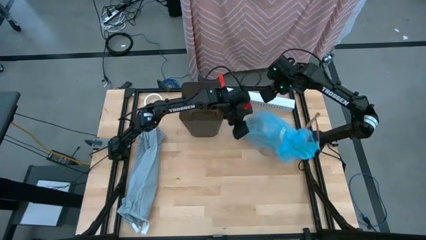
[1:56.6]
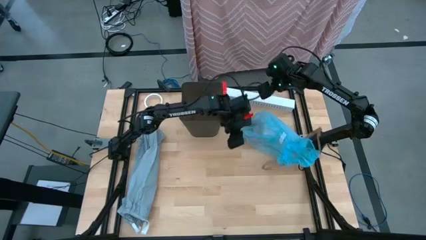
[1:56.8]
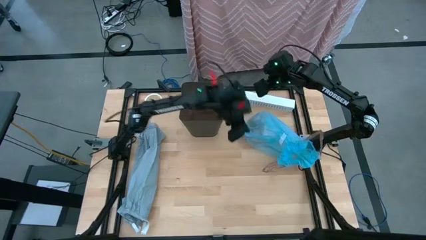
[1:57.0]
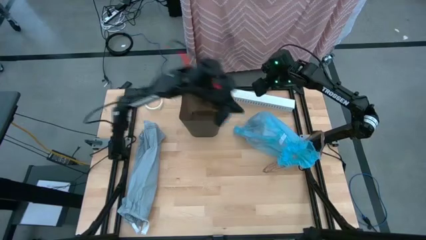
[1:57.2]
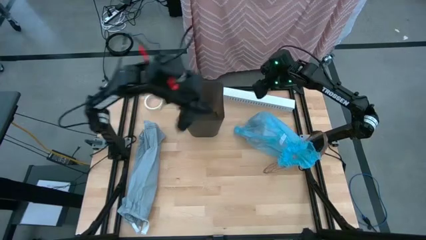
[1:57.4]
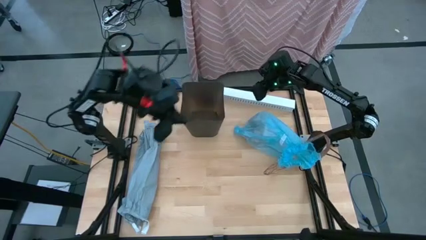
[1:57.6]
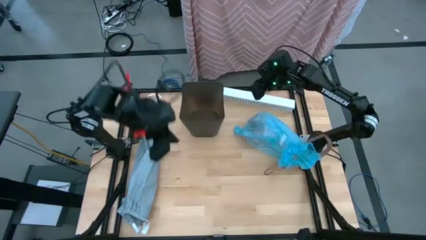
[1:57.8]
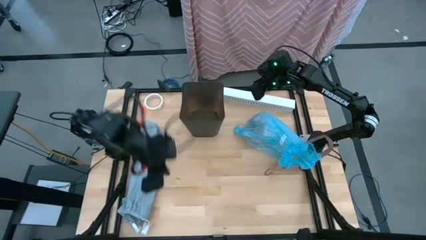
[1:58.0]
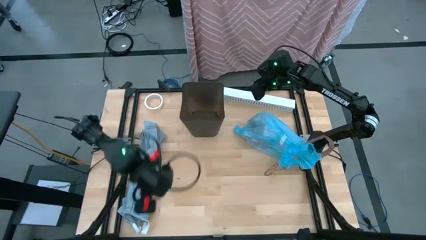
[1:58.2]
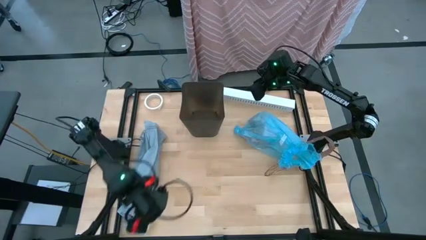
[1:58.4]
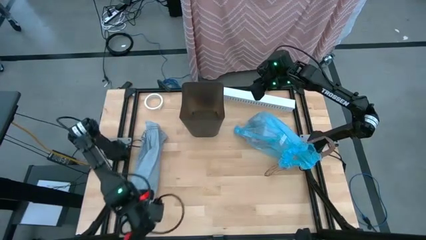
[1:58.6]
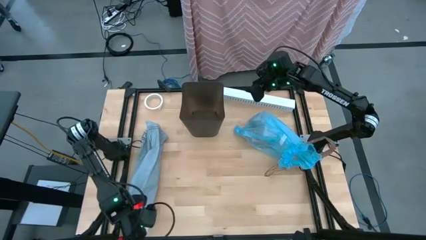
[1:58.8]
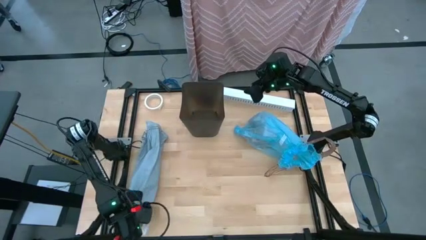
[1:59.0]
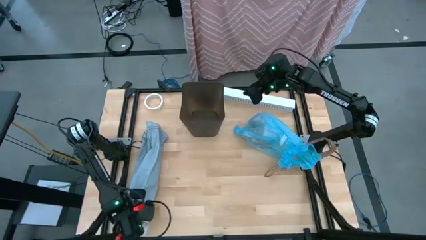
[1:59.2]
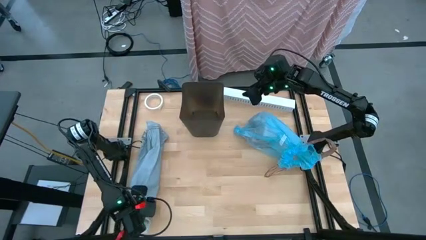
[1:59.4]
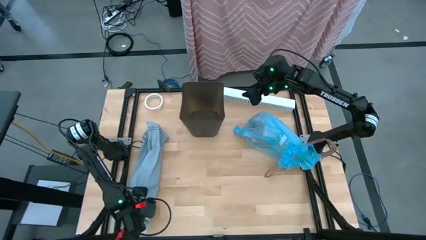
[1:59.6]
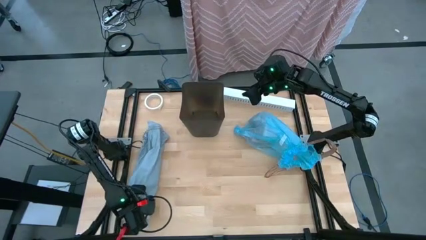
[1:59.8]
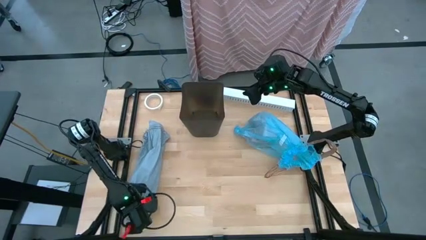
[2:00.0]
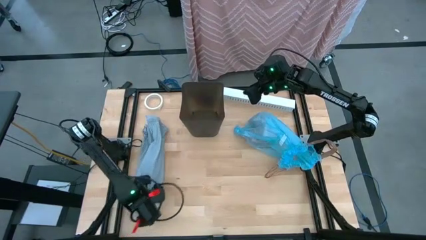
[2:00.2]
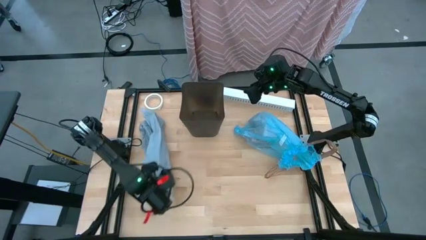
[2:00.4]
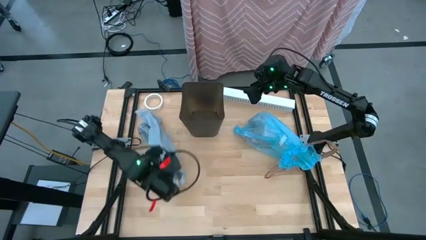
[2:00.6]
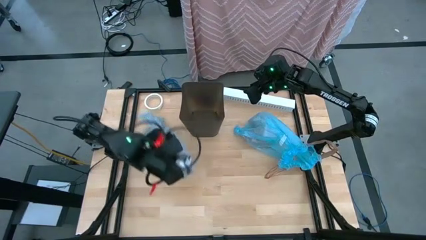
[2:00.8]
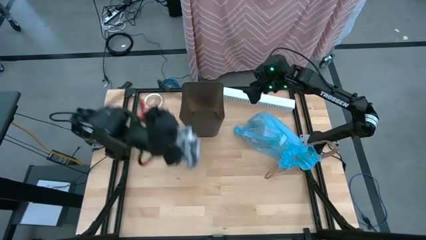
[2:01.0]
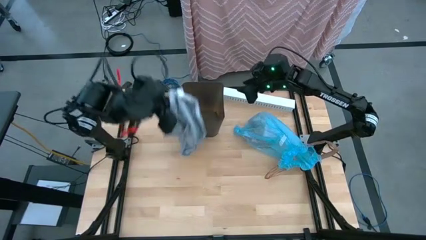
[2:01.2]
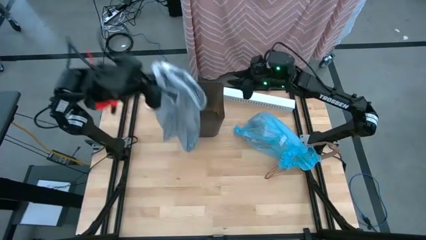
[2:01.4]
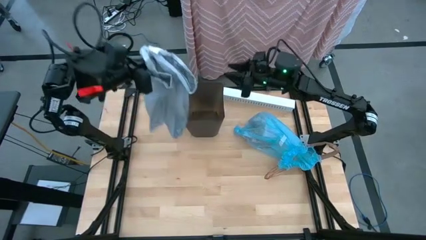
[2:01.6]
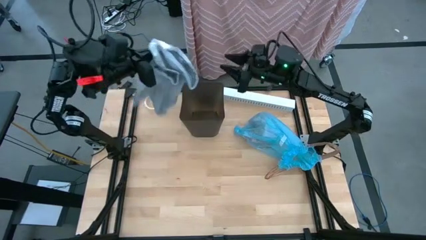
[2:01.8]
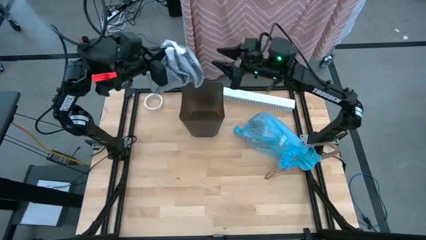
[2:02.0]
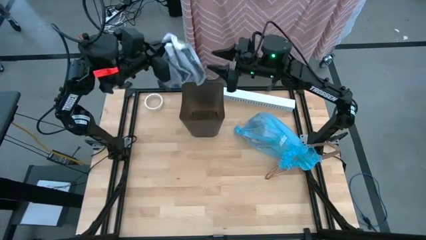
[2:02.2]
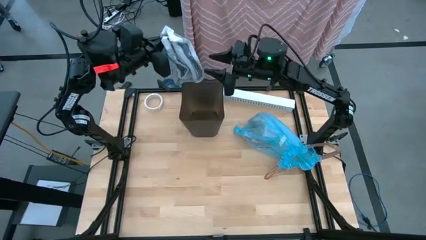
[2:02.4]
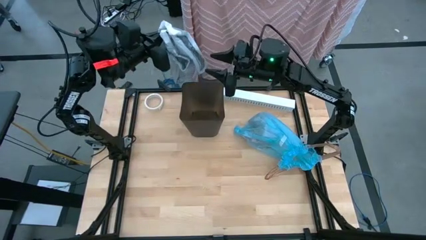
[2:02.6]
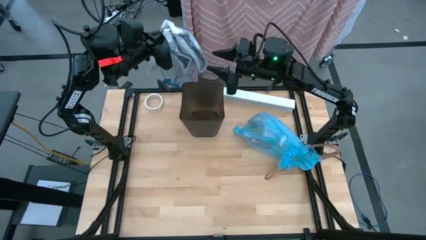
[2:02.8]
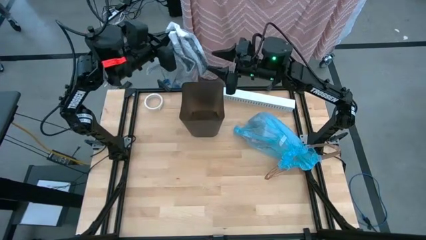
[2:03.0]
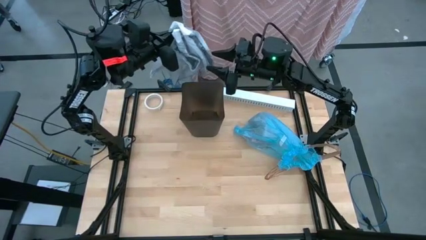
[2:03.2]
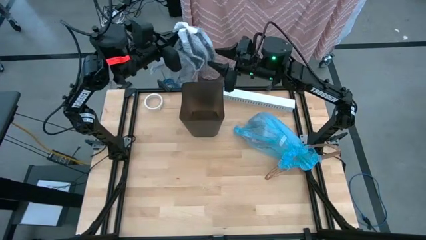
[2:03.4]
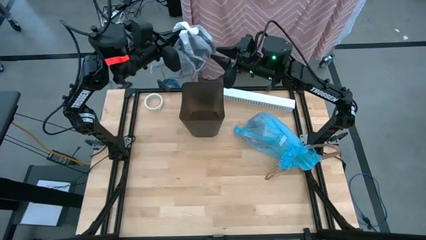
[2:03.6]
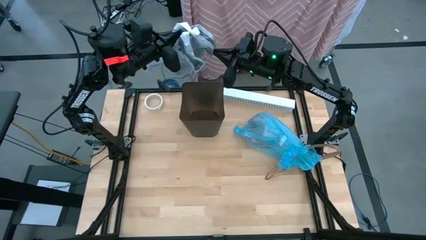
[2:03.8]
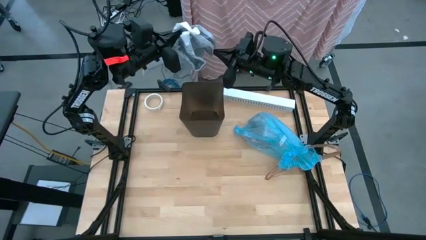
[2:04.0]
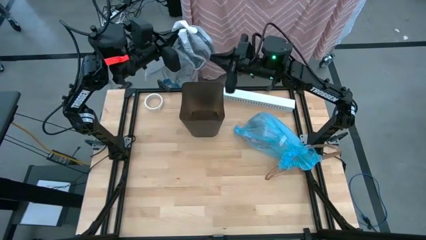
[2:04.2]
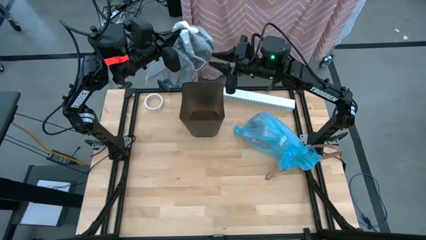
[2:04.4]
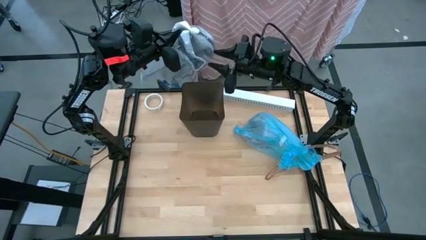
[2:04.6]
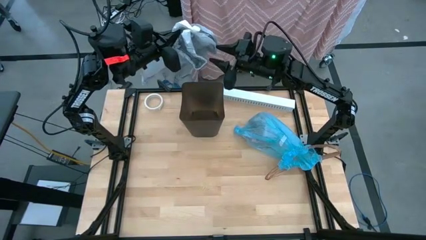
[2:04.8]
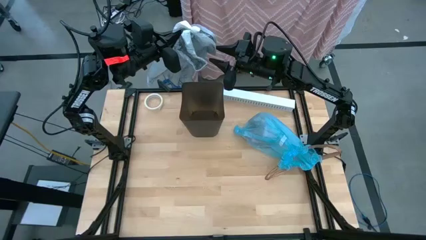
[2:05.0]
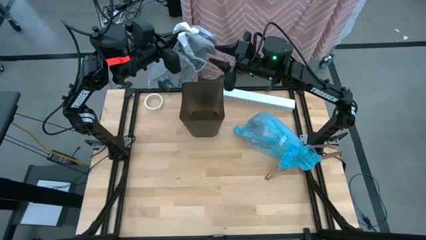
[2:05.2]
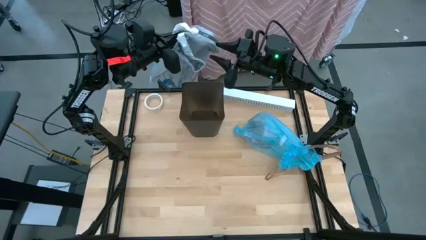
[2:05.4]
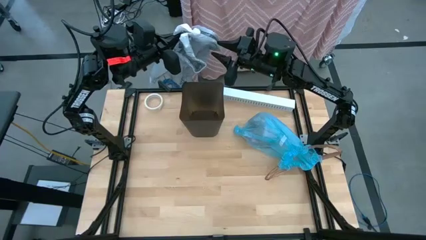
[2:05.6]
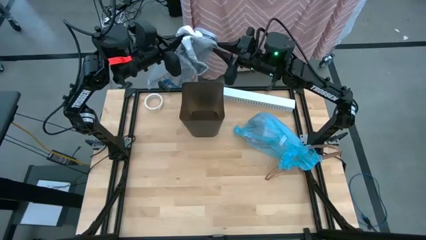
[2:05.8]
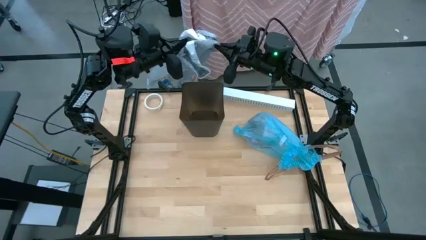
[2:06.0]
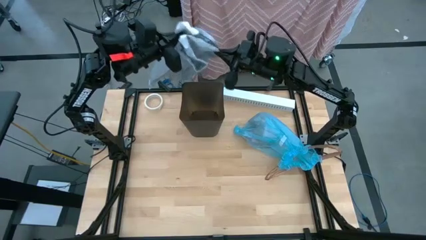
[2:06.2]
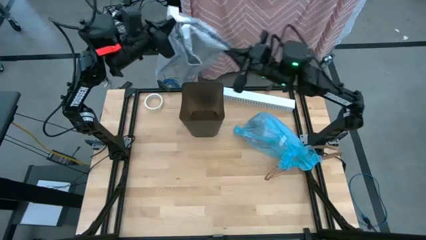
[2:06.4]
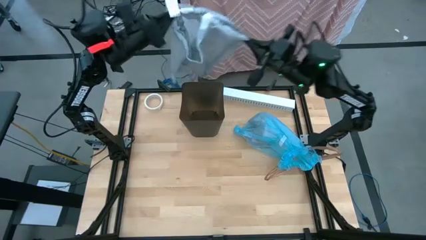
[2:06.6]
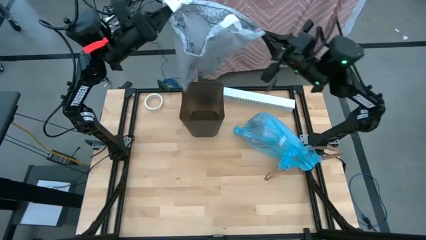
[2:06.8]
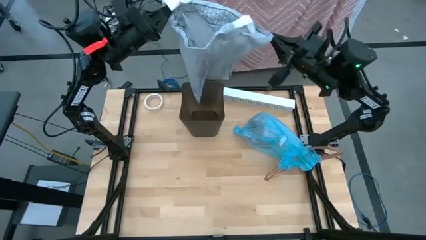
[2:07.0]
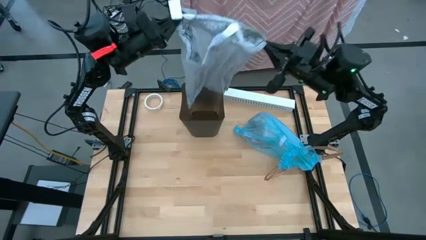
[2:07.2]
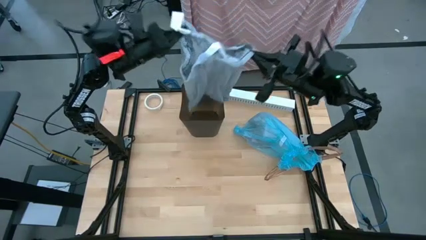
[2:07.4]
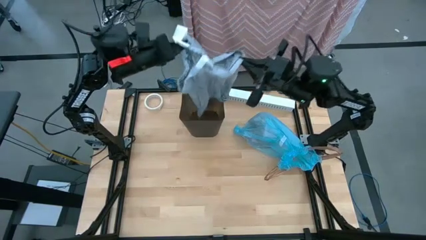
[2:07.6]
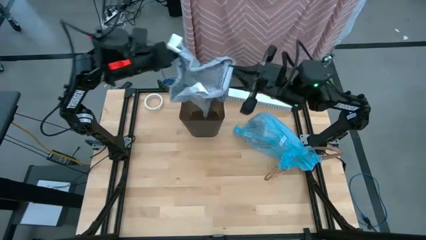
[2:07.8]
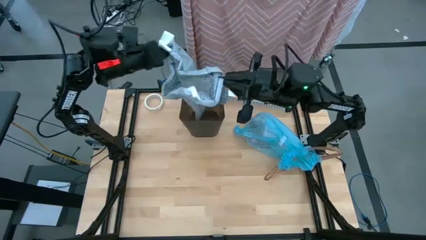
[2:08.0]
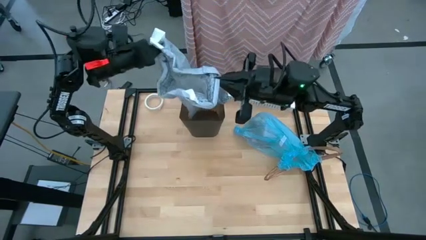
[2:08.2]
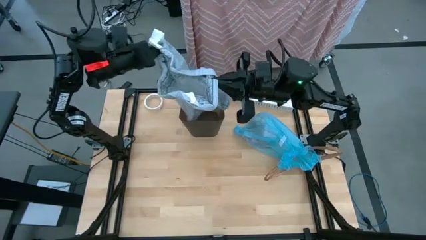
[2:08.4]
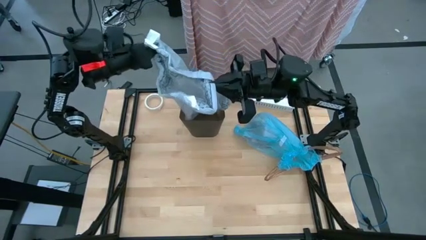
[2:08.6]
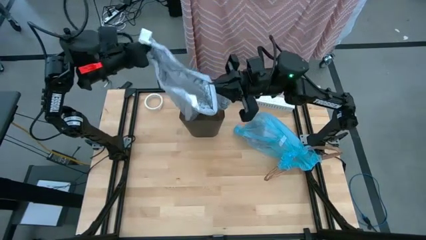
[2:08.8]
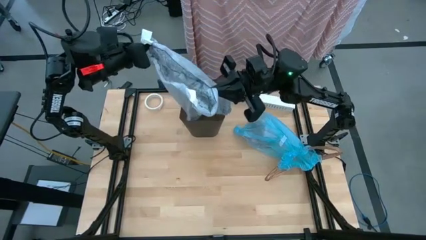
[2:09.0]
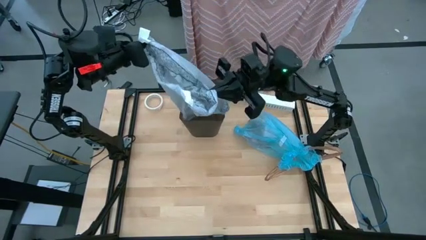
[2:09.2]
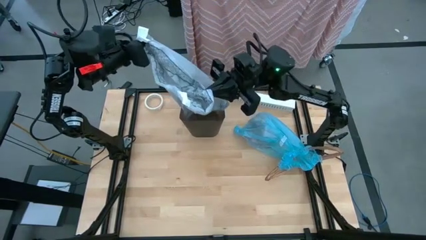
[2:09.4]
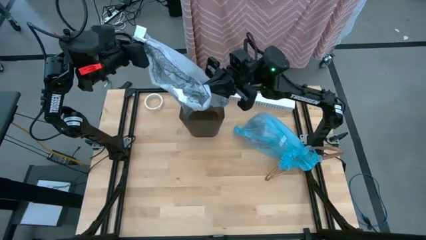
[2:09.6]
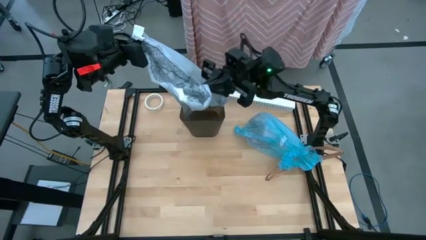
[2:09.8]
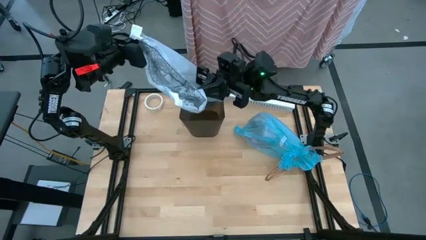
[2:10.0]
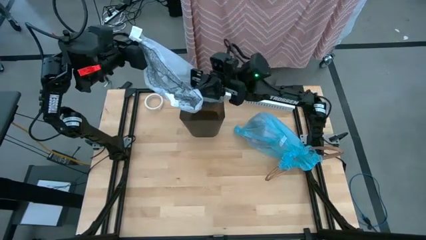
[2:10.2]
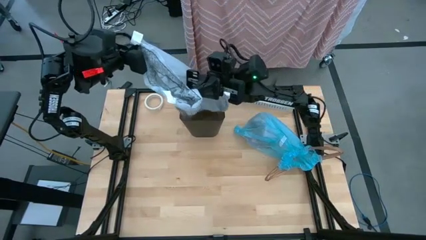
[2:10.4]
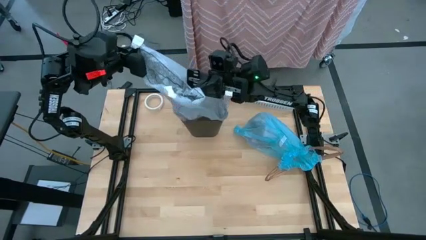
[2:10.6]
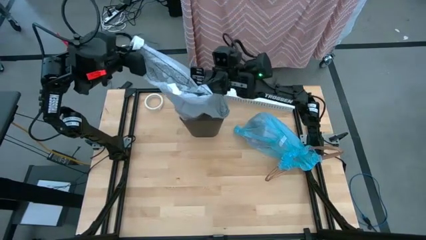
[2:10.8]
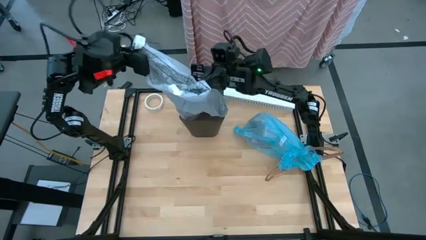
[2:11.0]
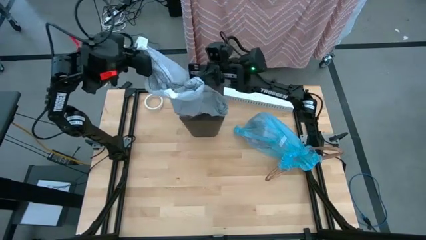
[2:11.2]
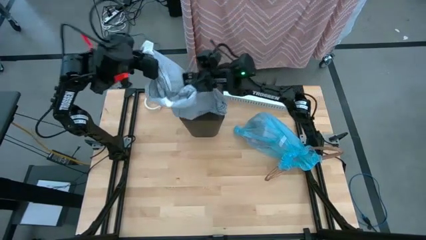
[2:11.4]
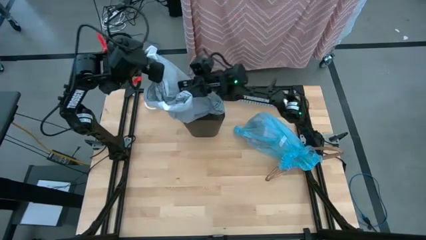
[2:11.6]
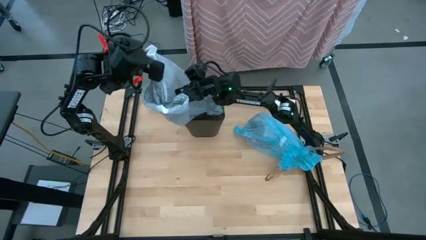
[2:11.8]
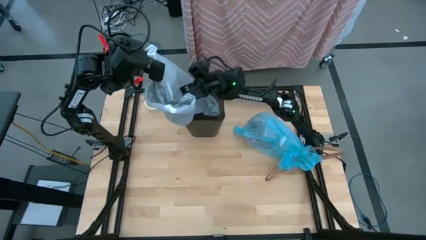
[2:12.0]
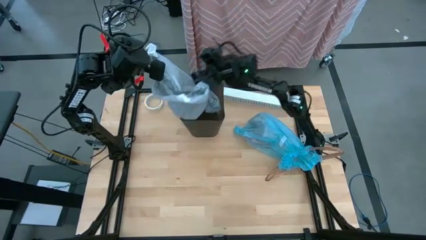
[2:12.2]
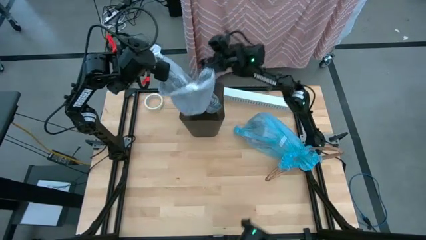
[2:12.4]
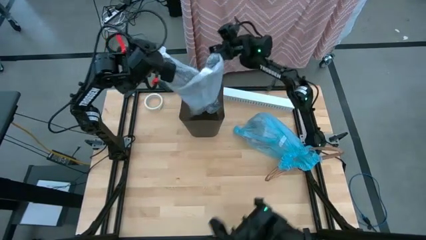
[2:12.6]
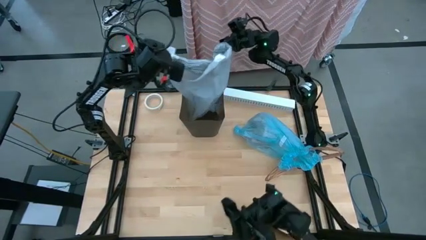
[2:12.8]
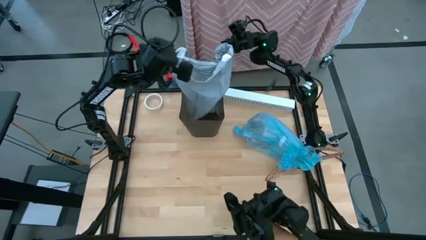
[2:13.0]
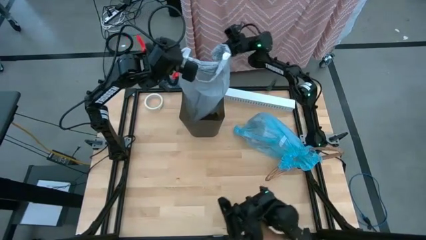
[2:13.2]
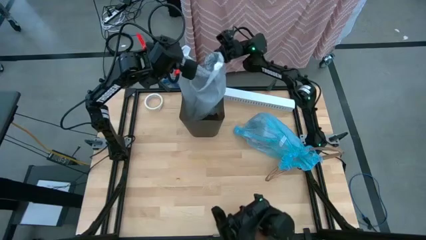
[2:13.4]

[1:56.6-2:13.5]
Task: place trash/remove bag and relplace
Insert the new gray trash bag into the bin
